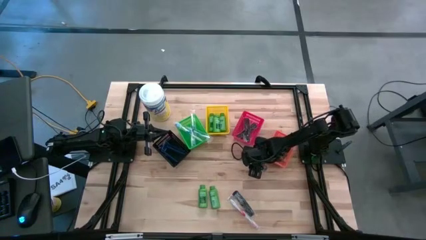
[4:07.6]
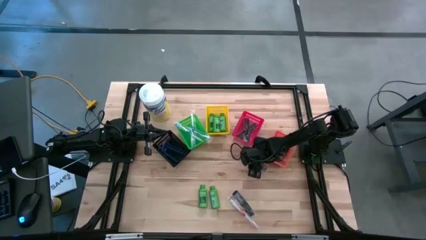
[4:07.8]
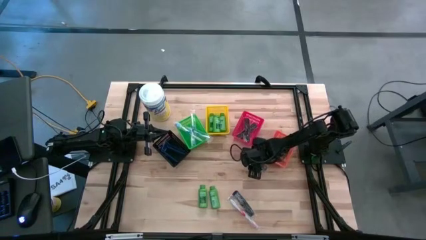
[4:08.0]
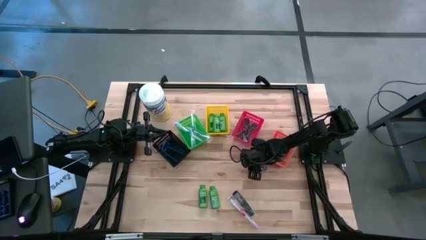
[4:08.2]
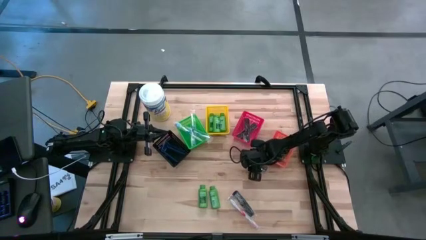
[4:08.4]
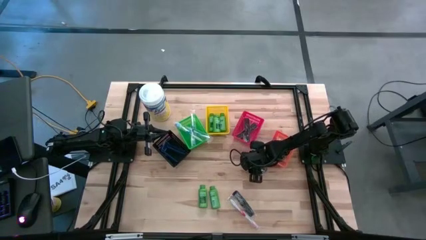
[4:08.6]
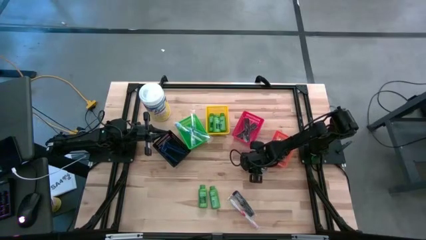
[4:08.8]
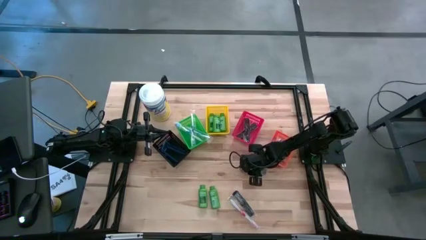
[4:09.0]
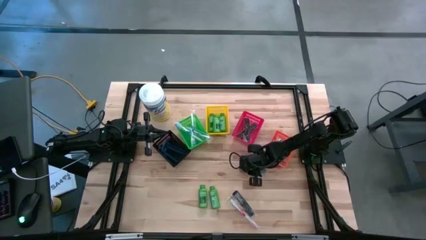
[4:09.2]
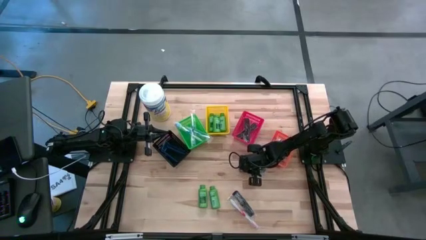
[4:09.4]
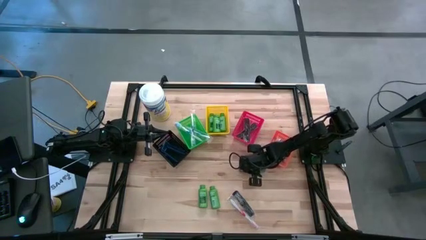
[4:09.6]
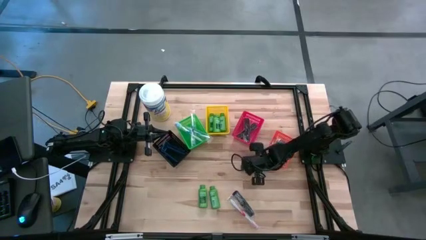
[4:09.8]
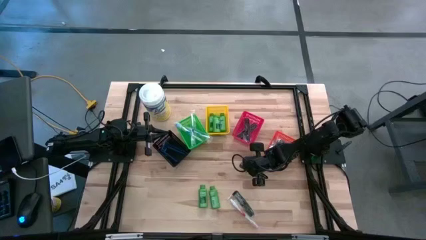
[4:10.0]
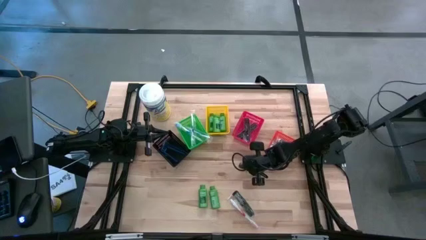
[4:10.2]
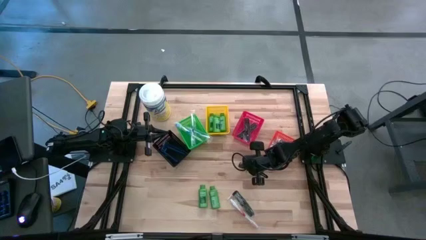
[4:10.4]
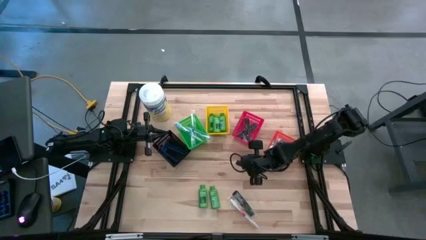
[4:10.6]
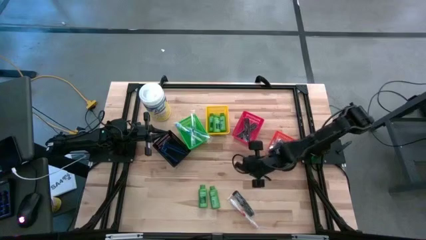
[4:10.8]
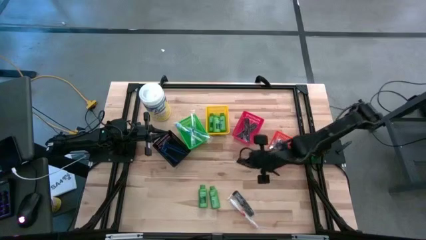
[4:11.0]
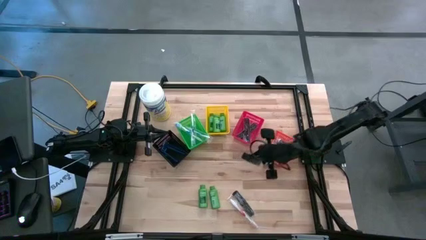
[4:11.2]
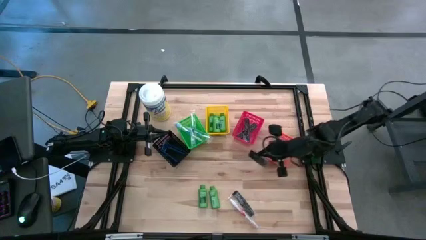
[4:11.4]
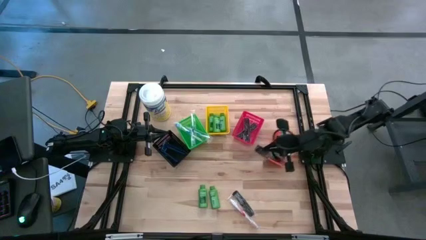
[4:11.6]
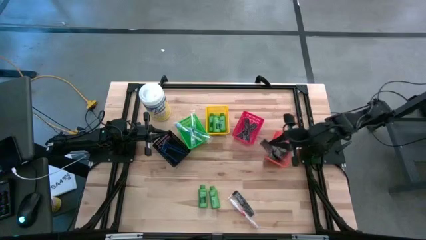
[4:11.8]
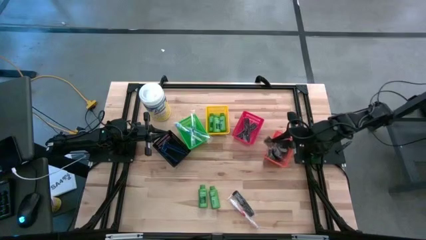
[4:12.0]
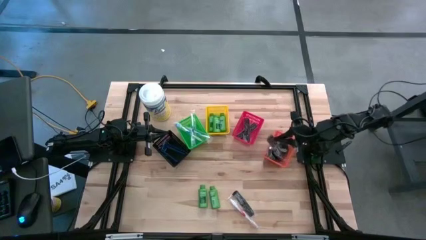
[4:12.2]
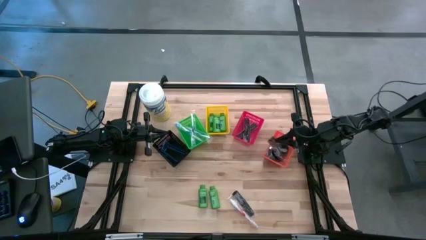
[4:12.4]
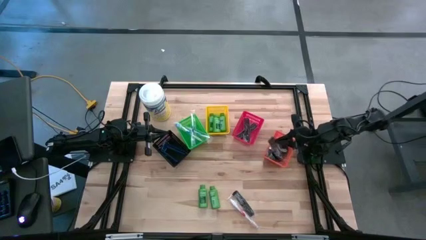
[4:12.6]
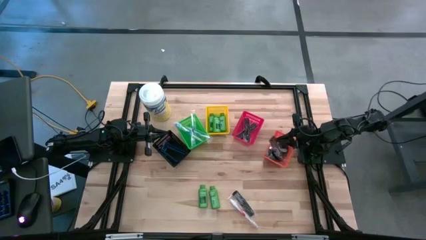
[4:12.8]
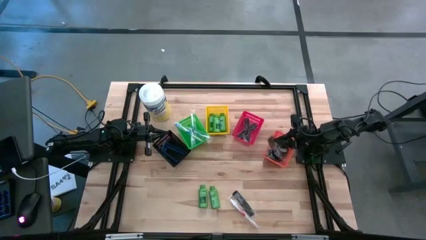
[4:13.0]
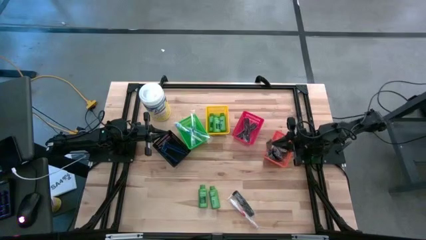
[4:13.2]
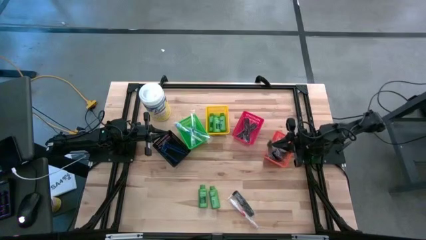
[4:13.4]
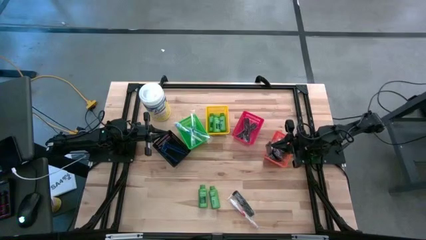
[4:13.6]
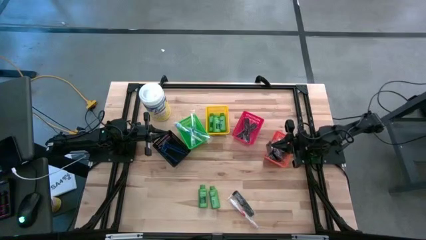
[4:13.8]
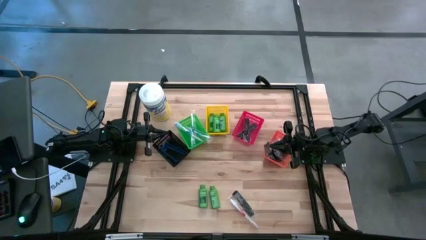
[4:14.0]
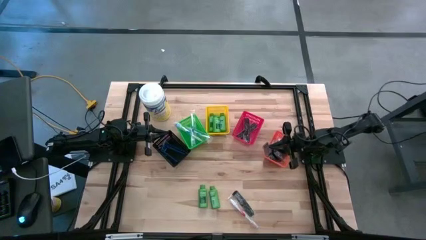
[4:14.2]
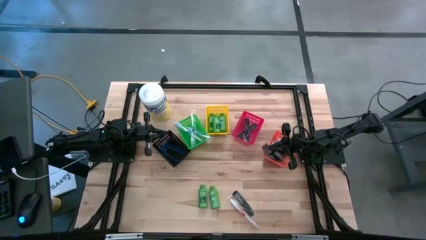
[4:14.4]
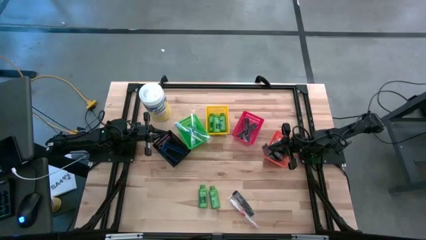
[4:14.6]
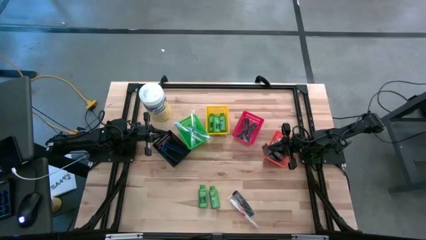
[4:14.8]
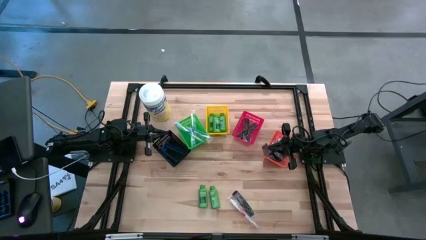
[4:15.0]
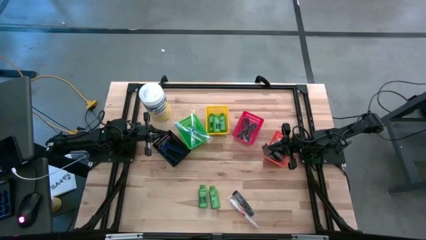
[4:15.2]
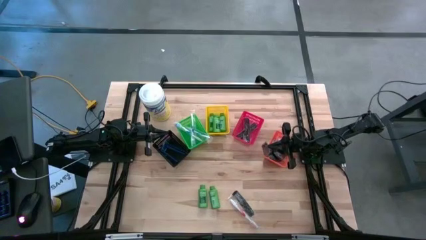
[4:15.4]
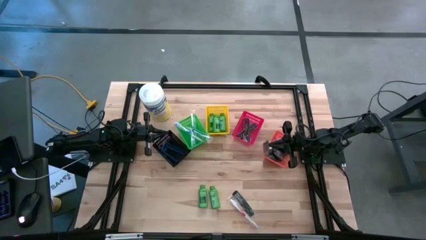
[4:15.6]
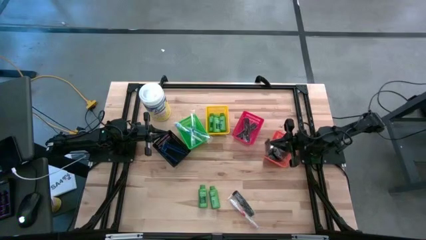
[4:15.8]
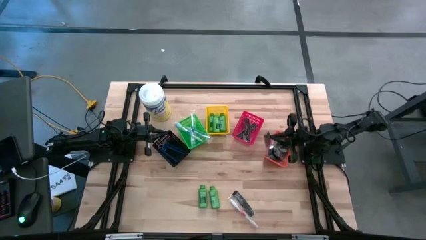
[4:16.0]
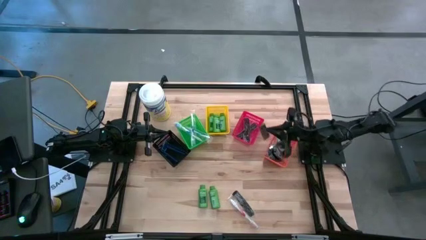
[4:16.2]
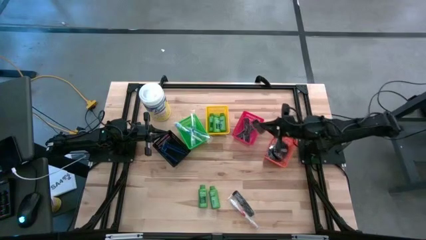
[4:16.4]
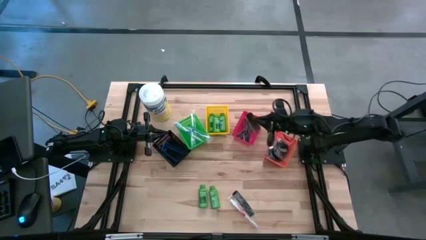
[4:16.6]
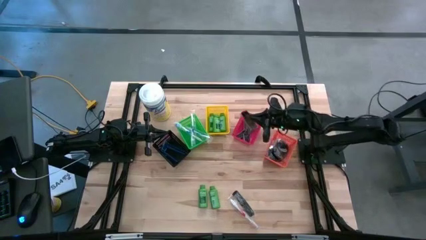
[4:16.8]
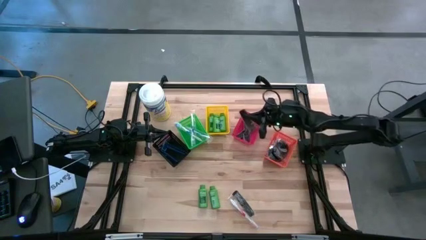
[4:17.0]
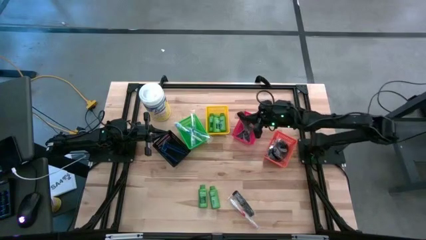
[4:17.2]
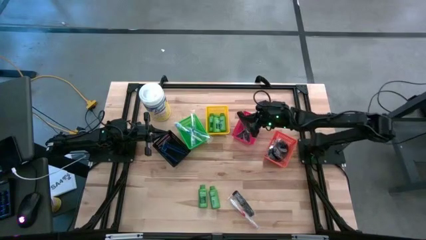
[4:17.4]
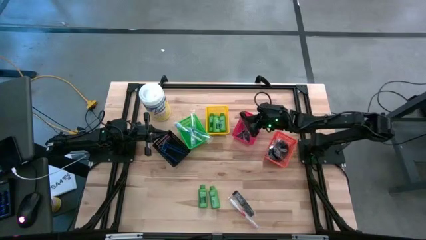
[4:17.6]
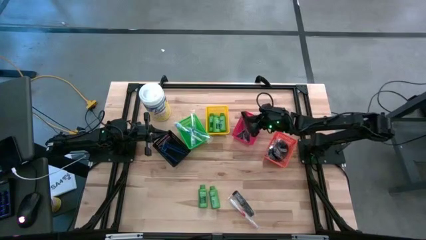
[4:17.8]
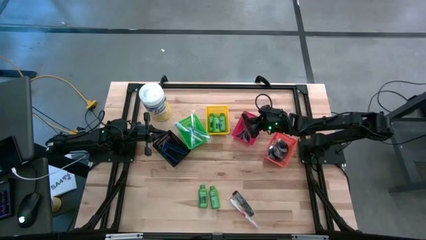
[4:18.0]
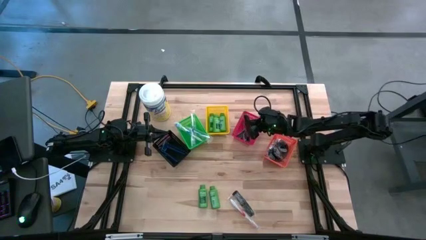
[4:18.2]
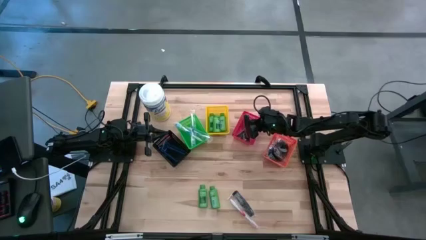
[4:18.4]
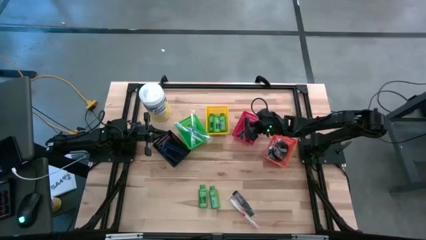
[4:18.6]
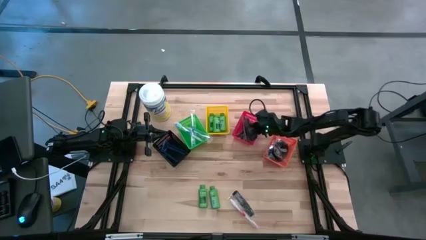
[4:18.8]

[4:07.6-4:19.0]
Task: Pick & Place Travel size toiletries
Put the black hair comb into the red bin
